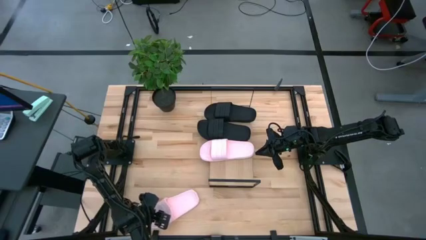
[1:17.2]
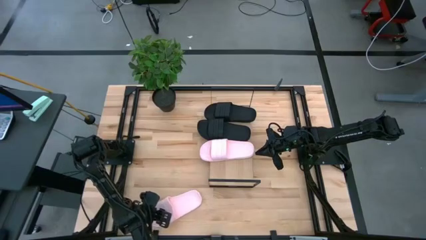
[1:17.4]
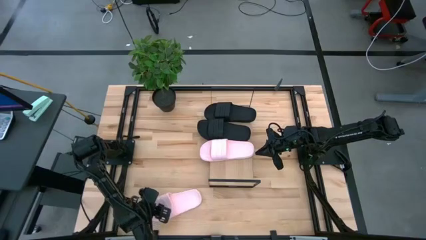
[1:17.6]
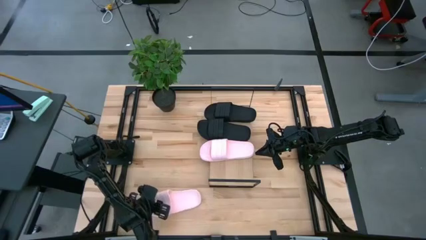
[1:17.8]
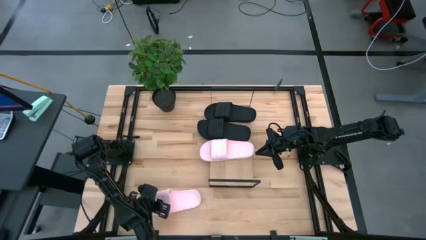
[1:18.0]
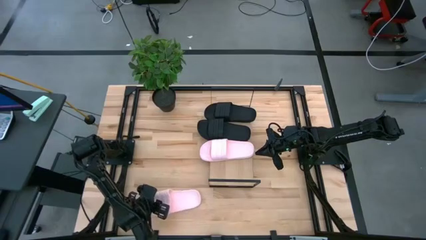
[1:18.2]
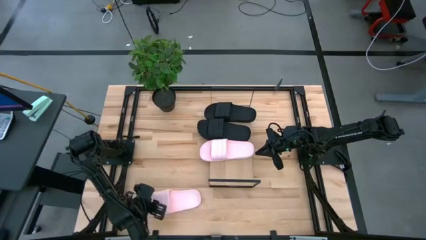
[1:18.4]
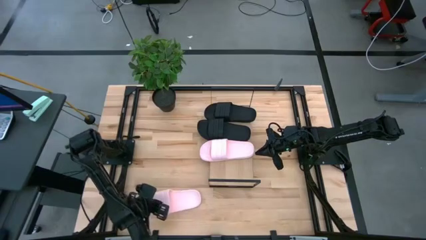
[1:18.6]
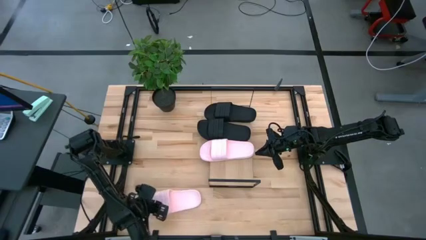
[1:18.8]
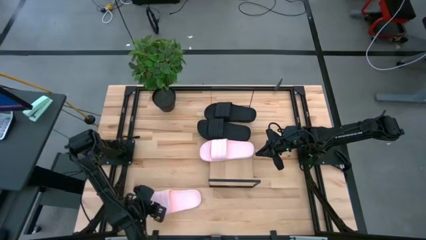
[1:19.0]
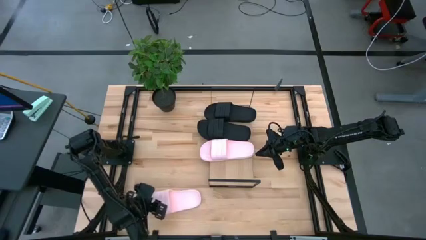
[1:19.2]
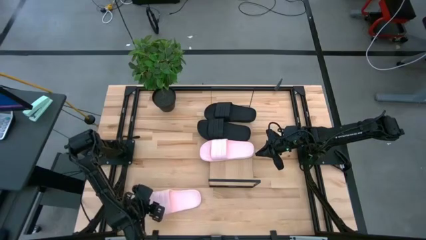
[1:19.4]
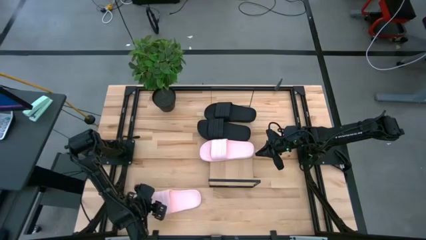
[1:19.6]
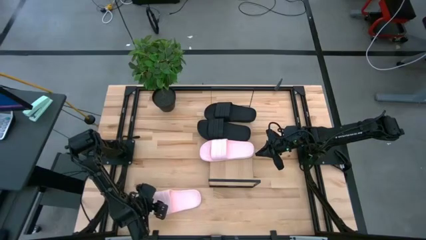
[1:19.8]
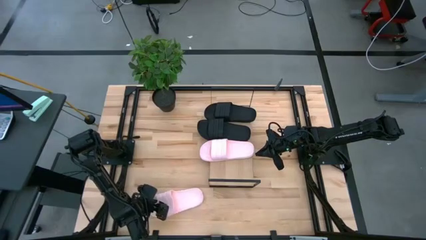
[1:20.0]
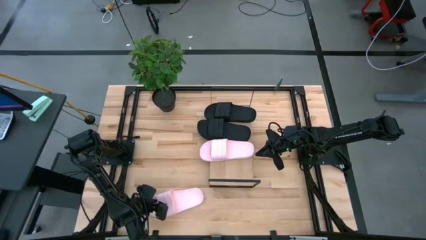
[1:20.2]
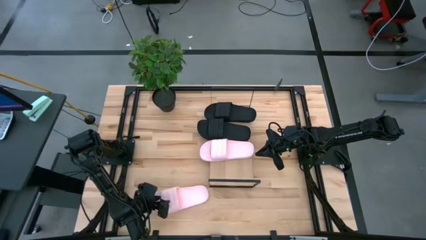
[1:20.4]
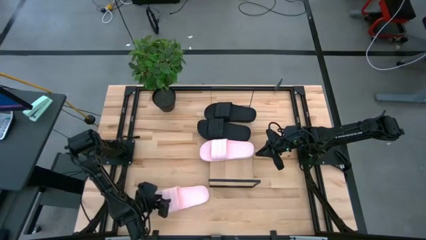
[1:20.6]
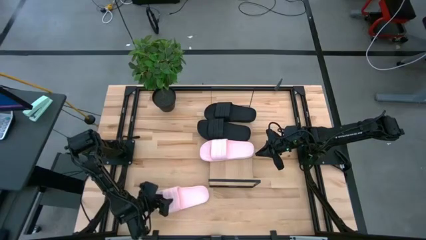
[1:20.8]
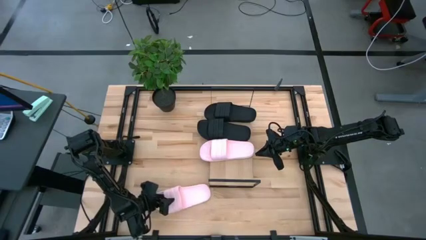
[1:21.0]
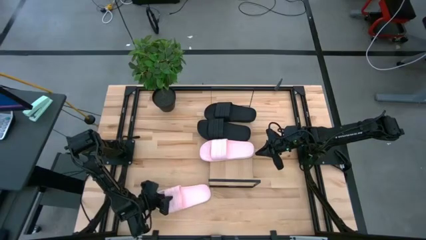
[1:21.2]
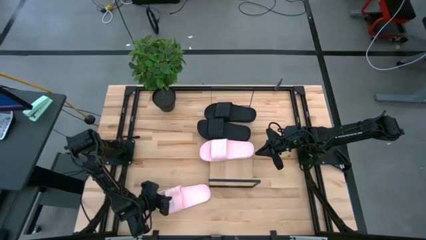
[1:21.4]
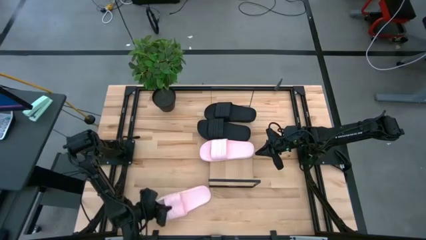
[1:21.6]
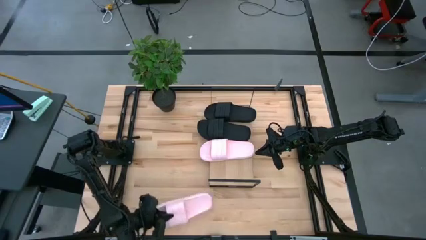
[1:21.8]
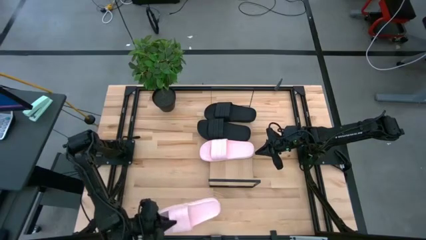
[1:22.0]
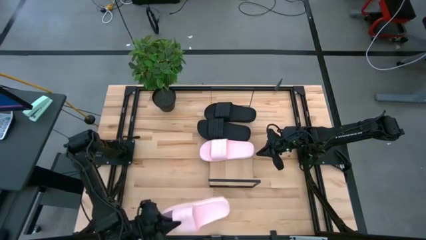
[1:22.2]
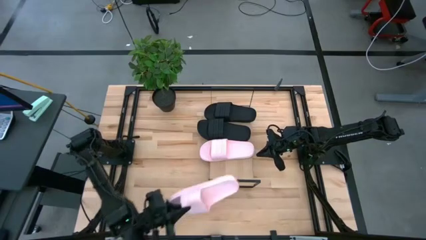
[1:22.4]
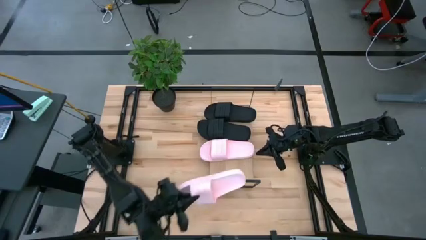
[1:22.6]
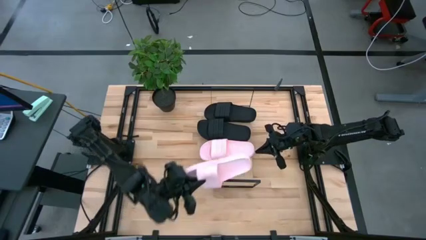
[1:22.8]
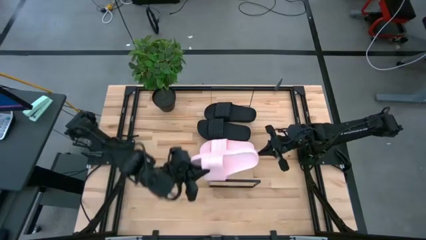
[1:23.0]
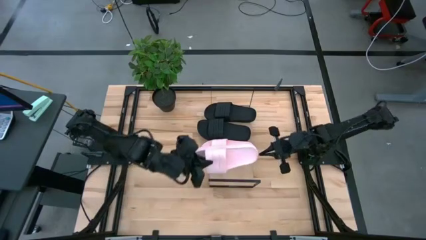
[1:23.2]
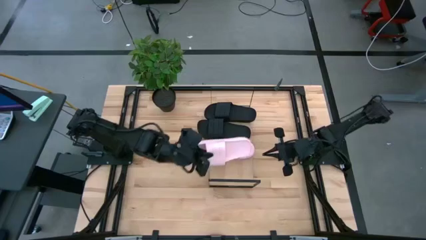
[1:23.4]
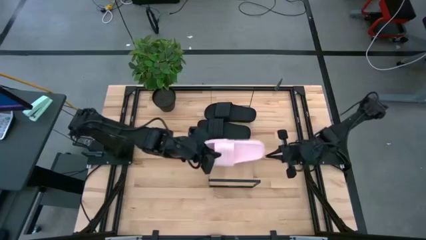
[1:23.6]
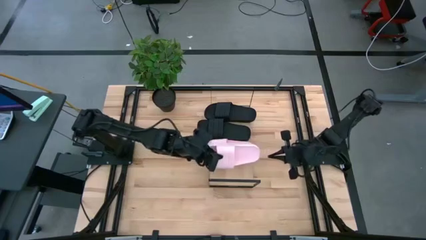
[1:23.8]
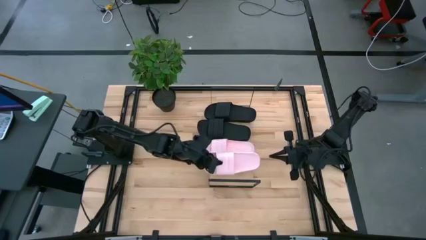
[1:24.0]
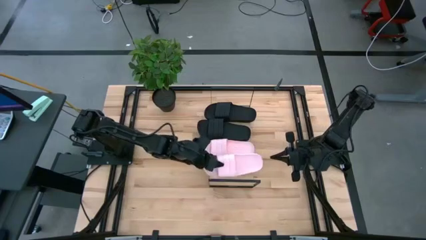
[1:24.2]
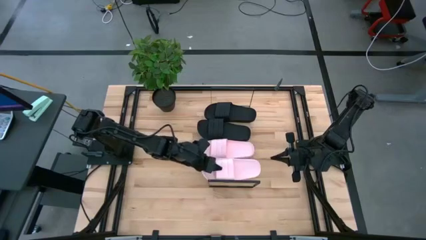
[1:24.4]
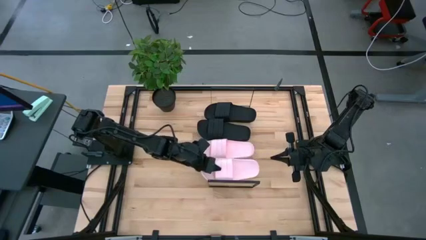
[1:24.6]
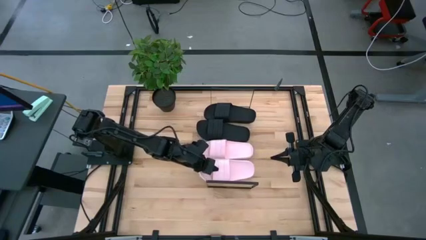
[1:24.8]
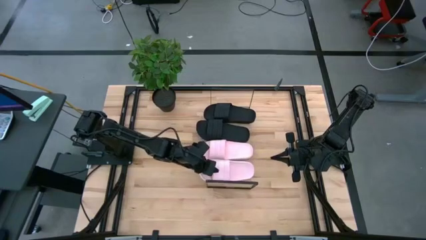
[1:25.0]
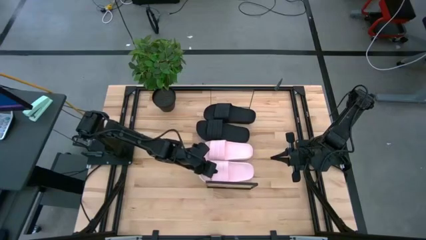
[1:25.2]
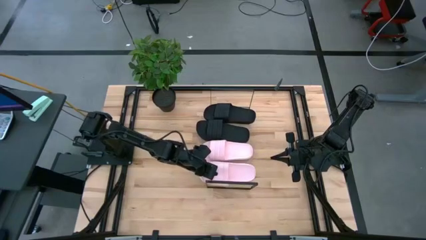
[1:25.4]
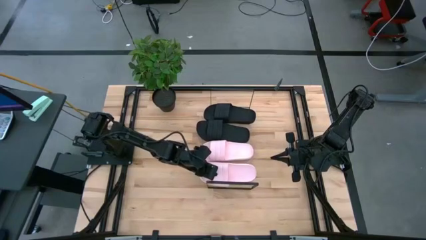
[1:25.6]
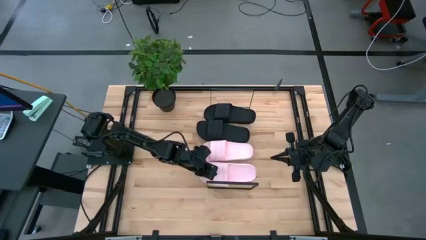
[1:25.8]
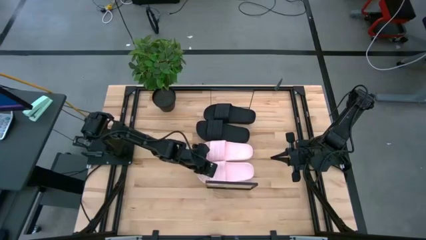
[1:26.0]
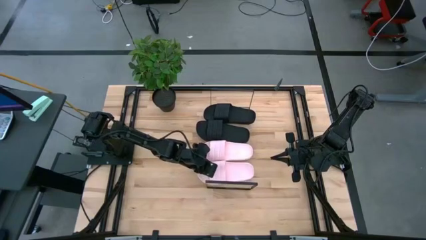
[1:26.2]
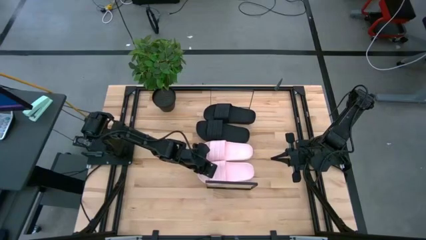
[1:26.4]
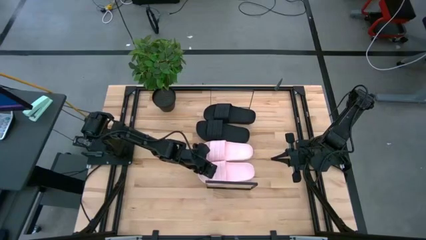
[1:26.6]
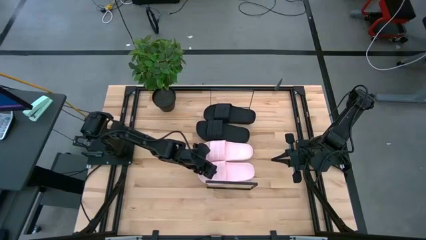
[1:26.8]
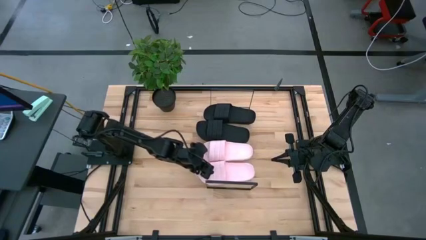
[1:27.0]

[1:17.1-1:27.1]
Task: Pick and place slides into the shelf
Put the pink slides on the shelf

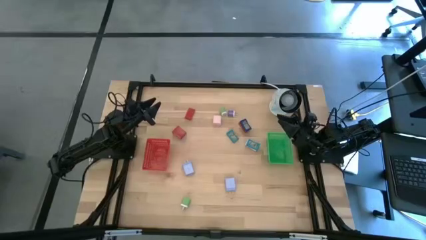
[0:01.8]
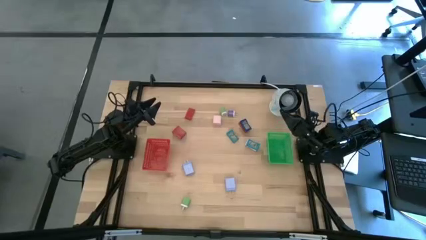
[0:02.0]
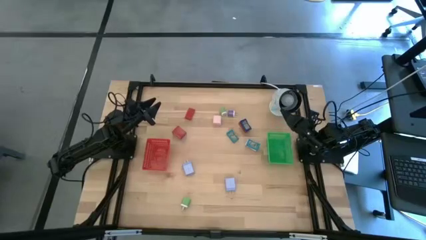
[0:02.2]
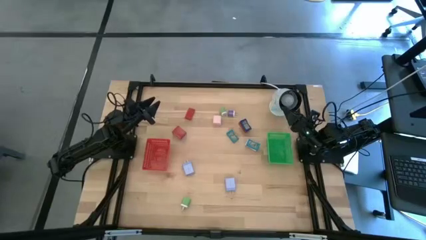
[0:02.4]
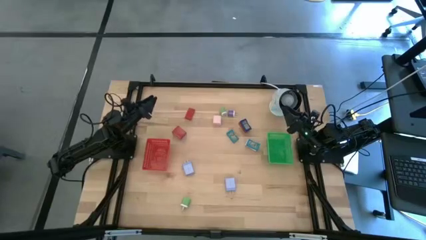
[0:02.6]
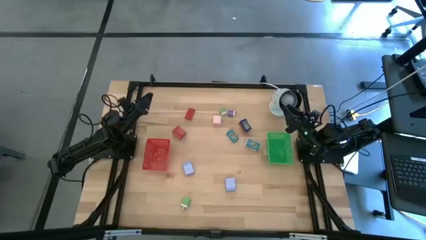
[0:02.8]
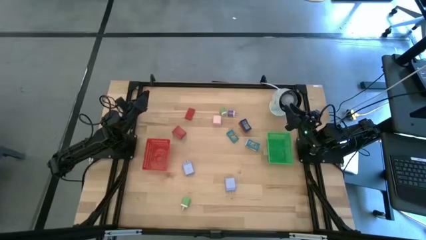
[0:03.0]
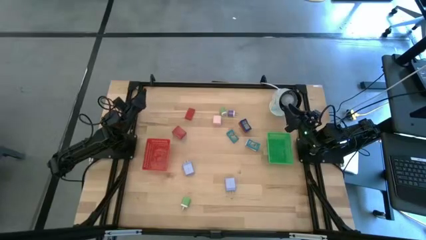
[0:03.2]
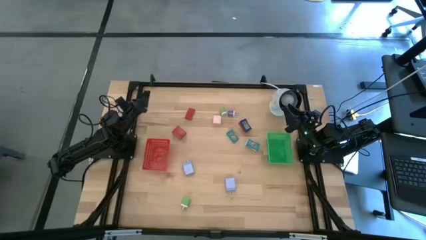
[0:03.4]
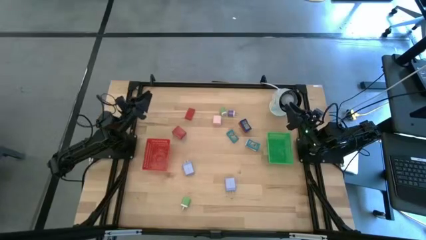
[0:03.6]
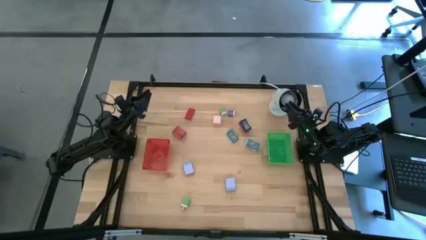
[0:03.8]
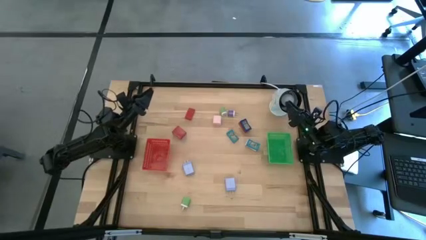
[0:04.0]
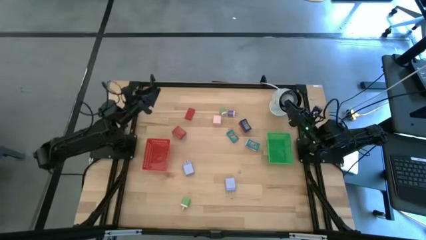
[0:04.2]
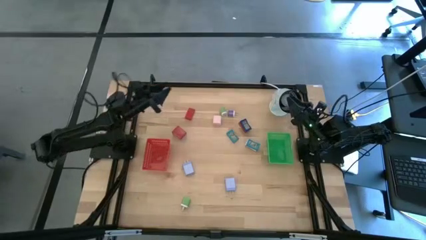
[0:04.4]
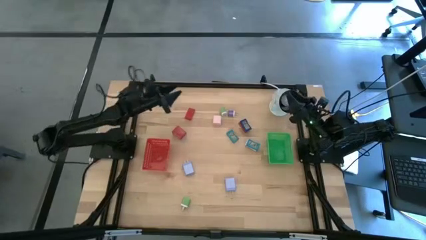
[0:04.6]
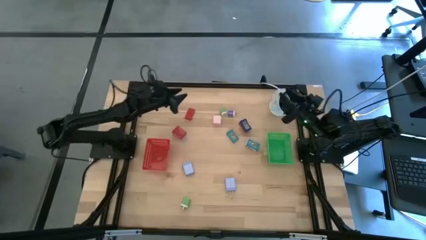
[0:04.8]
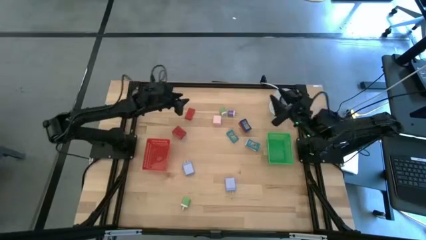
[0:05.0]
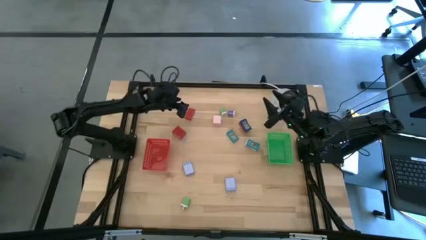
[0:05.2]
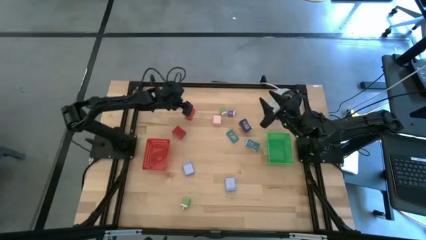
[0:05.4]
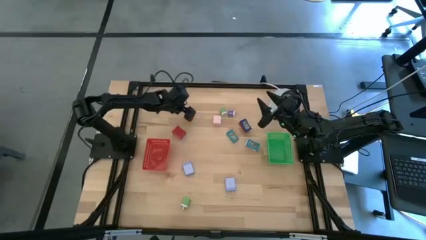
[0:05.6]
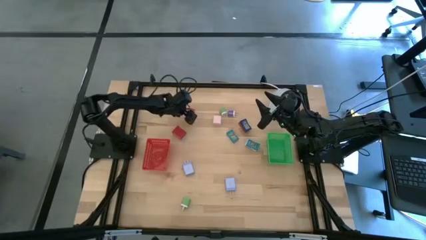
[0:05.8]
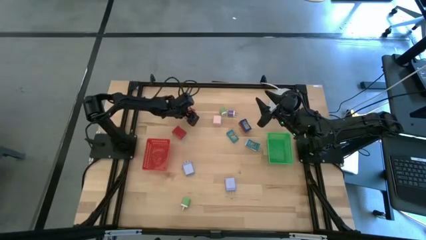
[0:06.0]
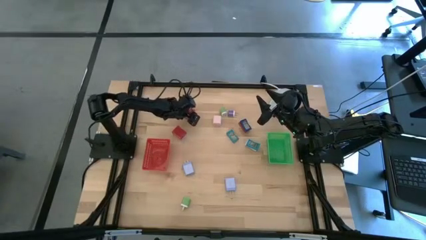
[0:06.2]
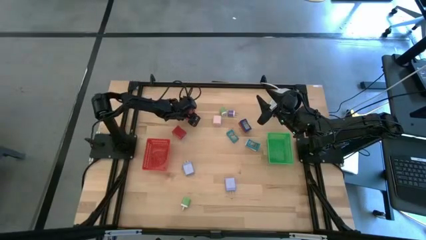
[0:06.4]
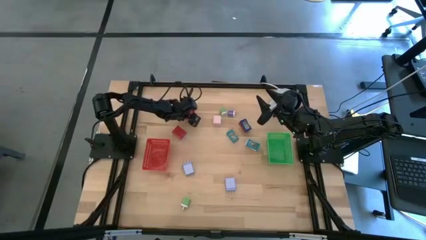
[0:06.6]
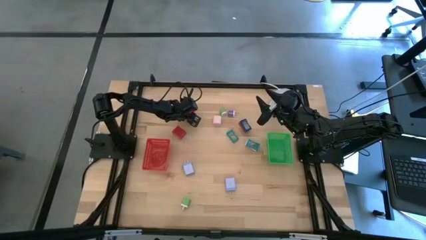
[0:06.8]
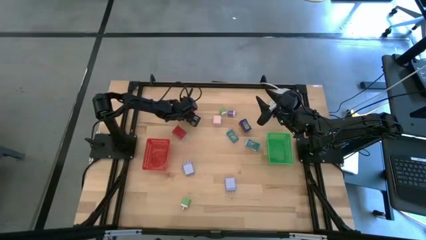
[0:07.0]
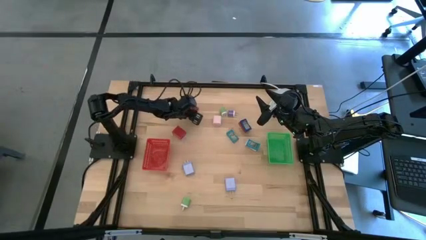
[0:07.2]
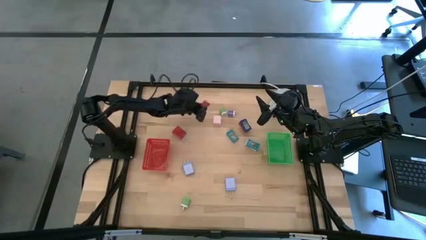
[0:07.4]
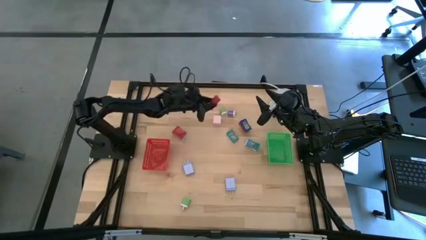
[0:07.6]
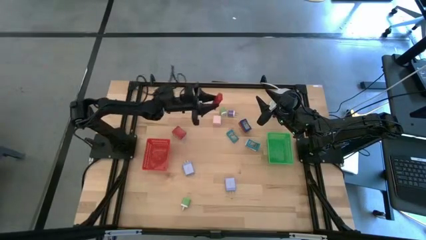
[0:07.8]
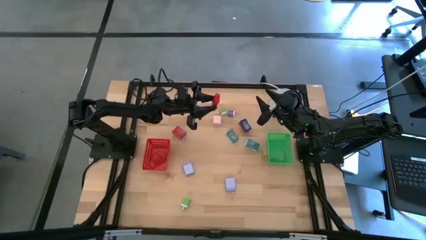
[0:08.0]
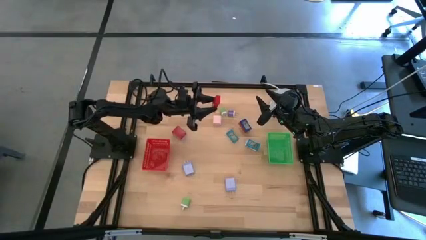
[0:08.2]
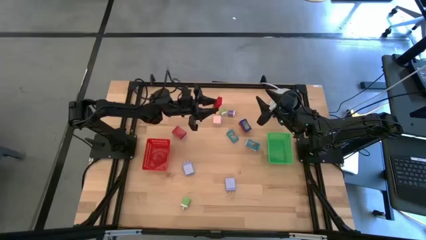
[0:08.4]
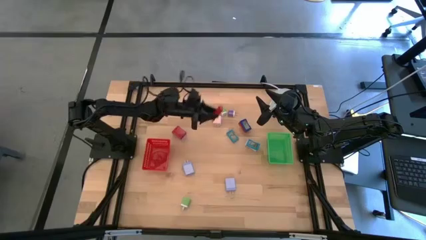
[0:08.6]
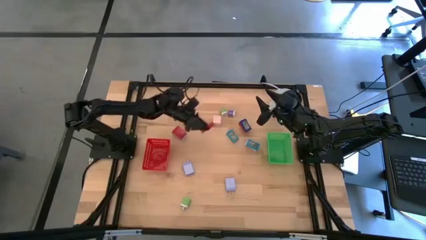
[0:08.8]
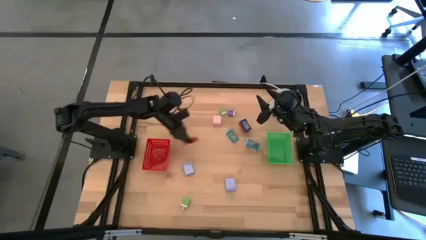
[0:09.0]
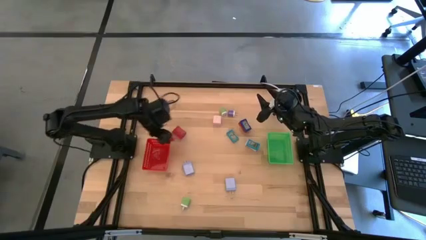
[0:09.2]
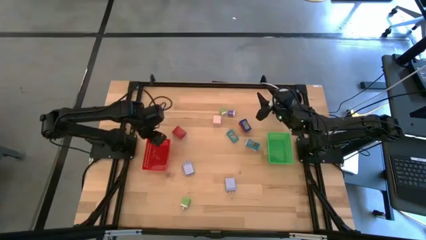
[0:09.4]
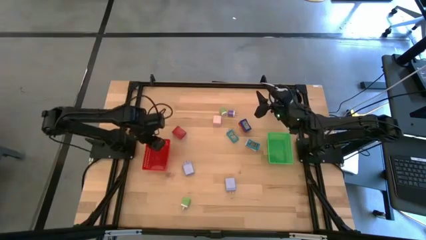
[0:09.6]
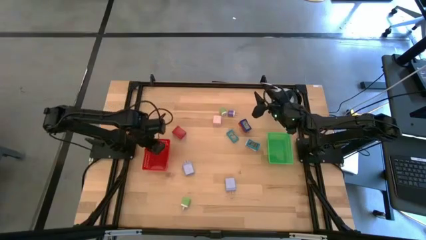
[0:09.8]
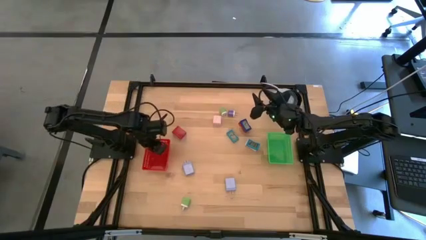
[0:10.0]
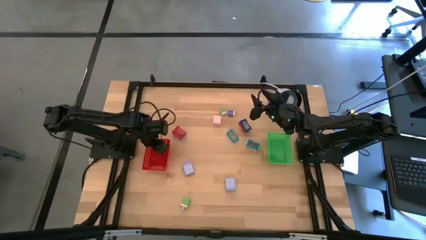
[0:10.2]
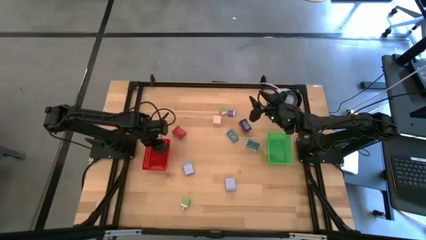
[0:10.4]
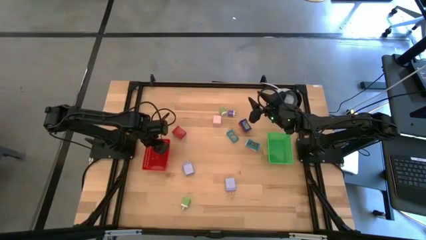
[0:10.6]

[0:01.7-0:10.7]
Task: Pick & Place Office items
Put the top red digital timer into the orange basket
